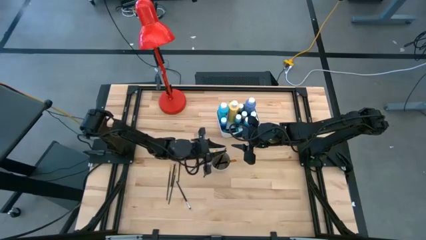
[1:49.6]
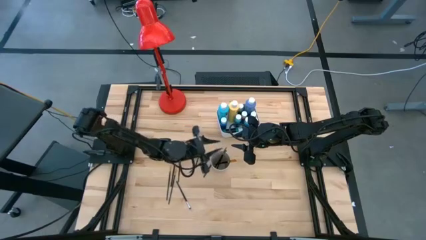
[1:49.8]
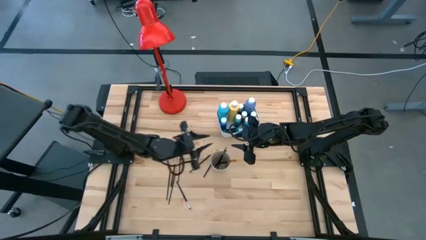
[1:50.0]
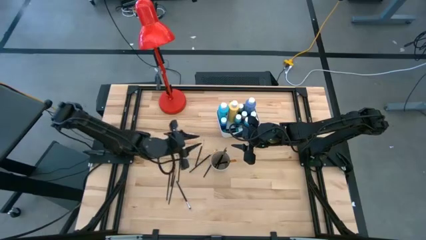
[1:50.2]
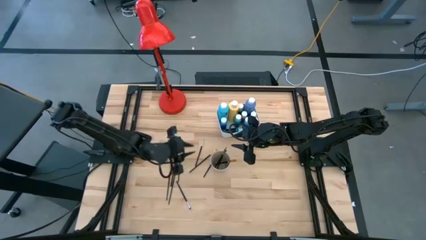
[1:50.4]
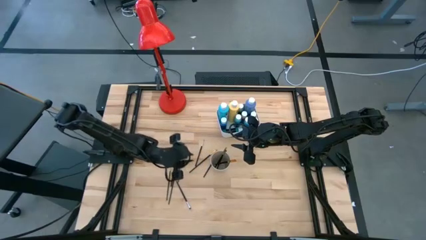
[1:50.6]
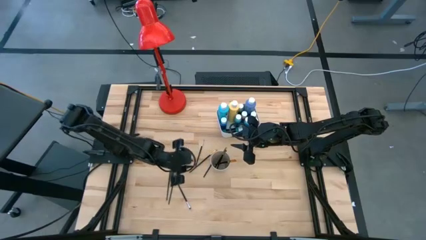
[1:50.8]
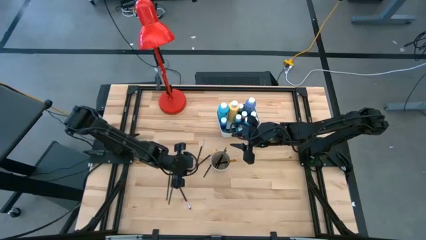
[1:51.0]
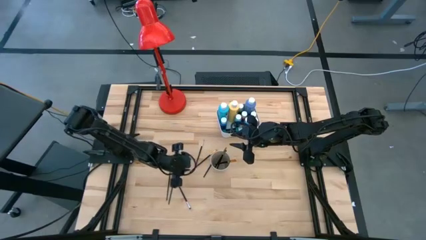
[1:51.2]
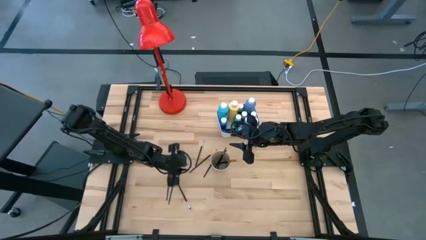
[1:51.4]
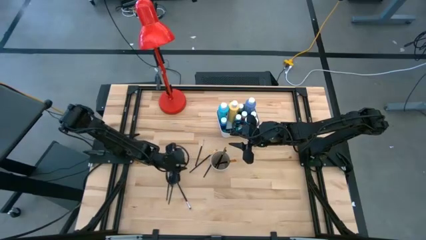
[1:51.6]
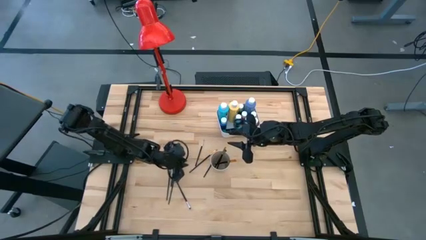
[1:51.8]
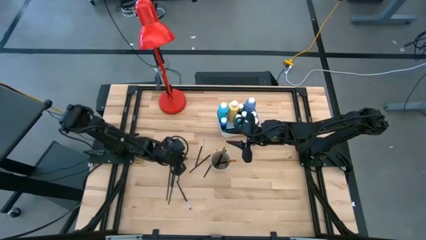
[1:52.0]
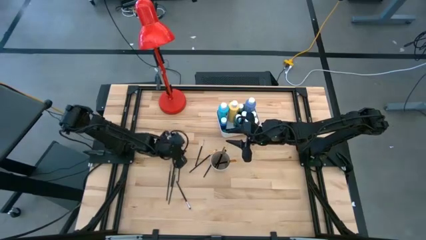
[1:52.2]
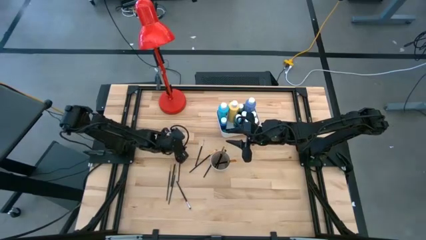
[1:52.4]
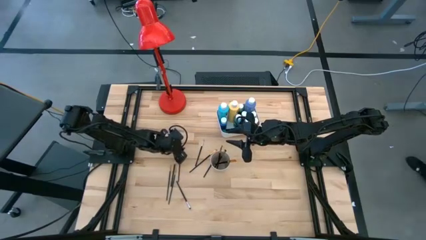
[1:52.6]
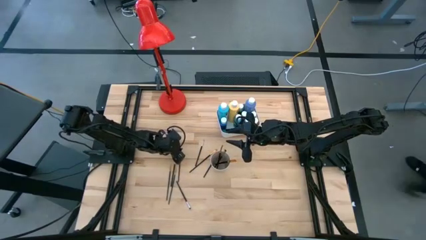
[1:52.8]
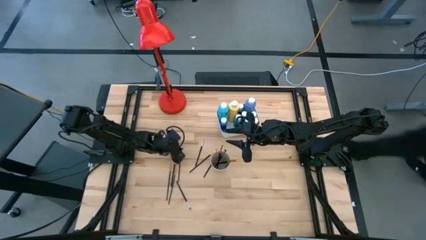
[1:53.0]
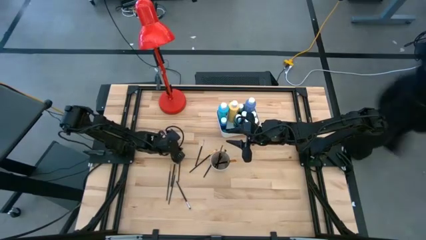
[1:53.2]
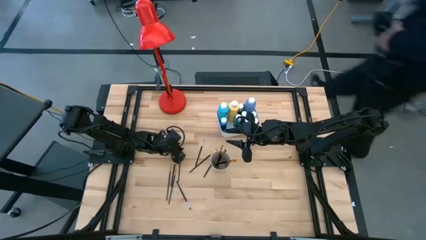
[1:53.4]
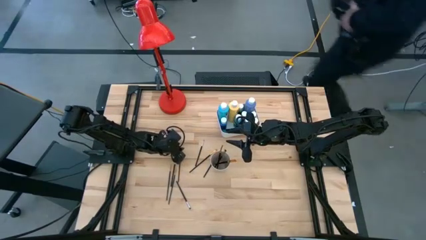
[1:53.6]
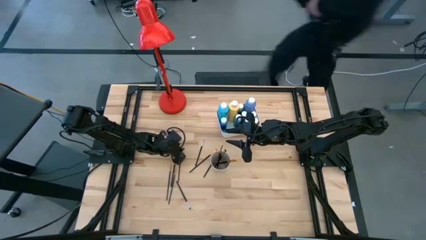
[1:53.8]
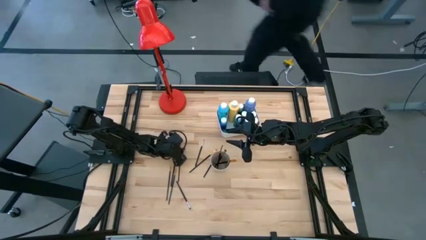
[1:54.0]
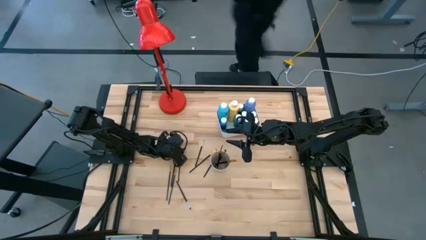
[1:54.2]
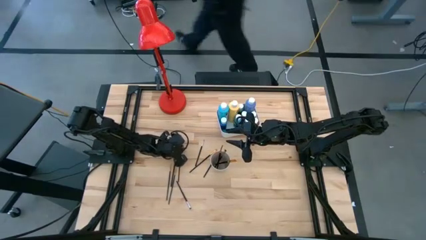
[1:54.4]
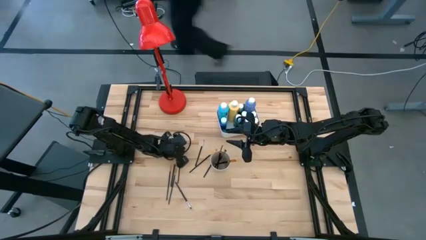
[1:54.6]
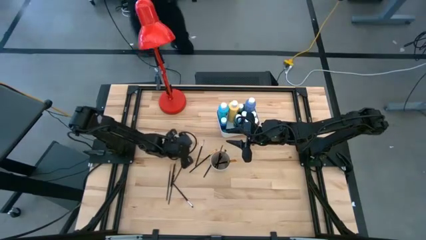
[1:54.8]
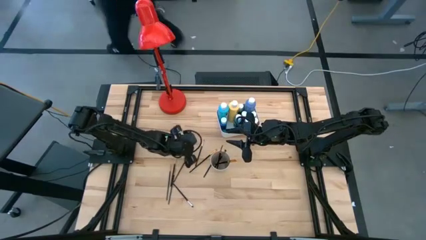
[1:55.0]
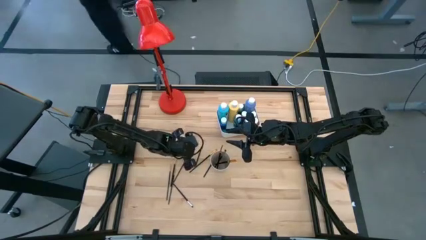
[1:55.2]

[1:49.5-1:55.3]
Task: Pick & Place Paint Supplies
Put the gold paint brush into the white cup

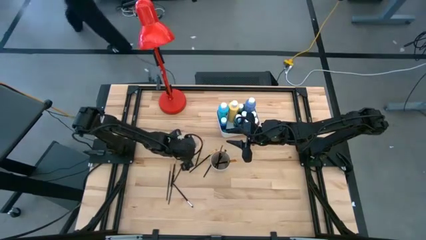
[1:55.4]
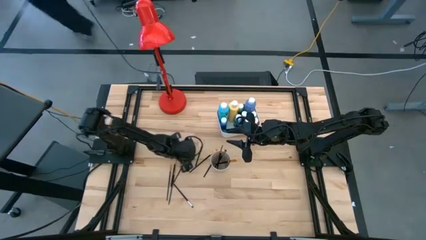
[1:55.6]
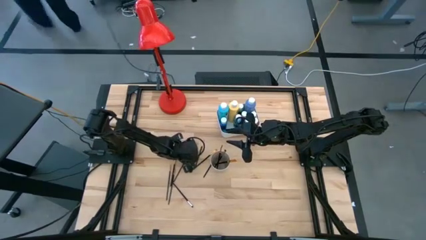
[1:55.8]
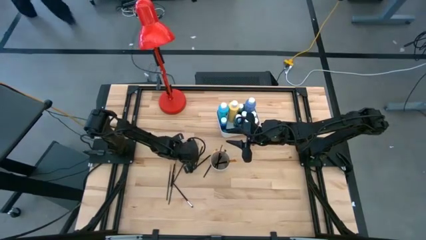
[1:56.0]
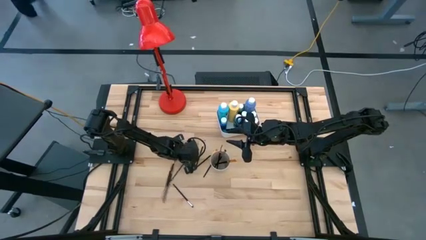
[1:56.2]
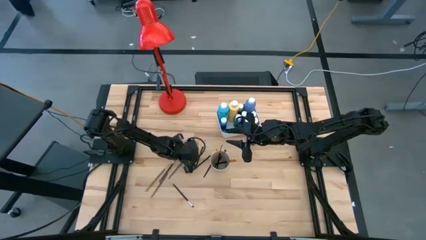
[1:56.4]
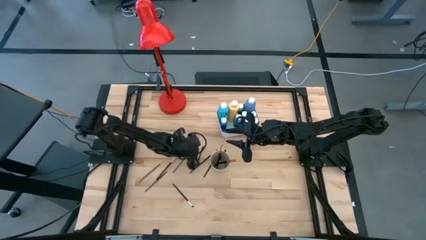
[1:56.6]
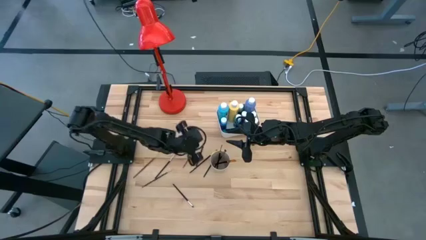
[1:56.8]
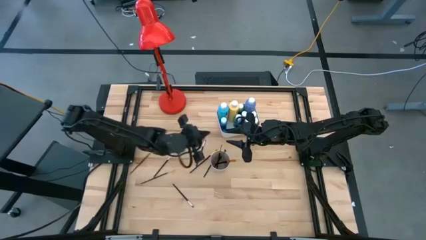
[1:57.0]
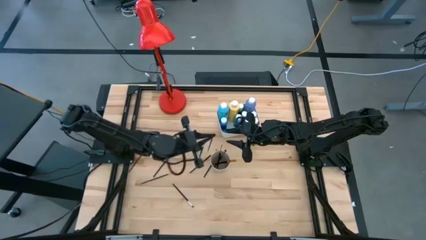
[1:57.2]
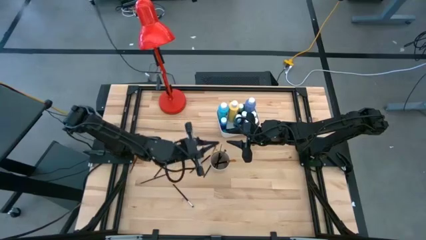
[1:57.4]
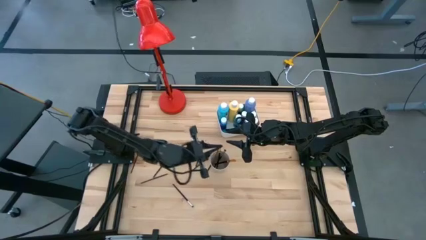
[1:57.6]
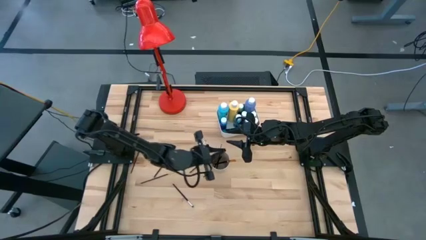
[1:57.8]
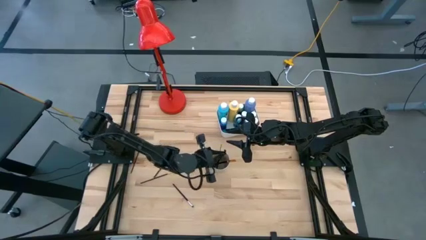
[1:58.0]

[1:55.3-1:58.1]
Put the gold paint brush into the white cup

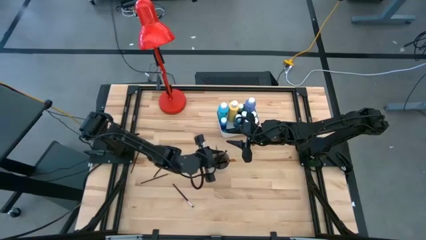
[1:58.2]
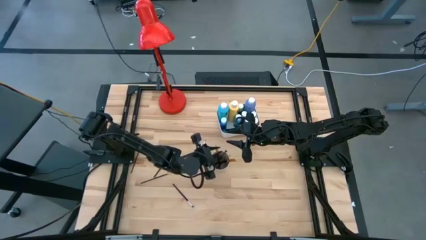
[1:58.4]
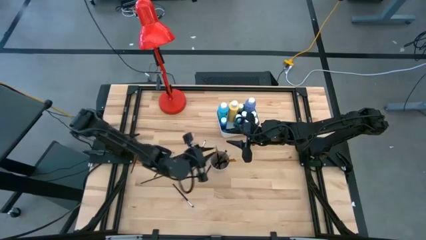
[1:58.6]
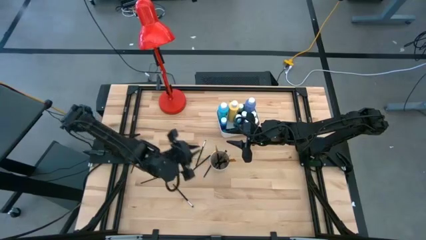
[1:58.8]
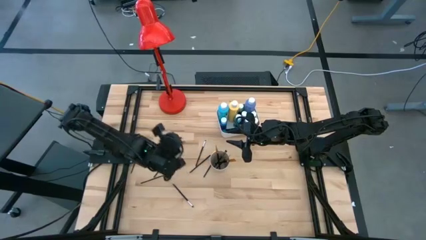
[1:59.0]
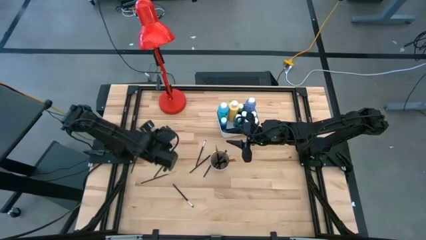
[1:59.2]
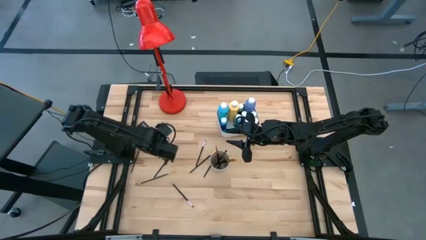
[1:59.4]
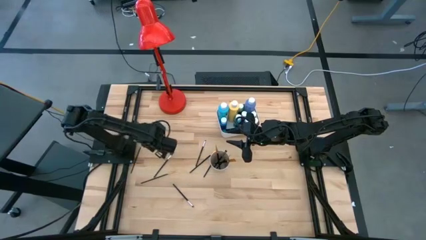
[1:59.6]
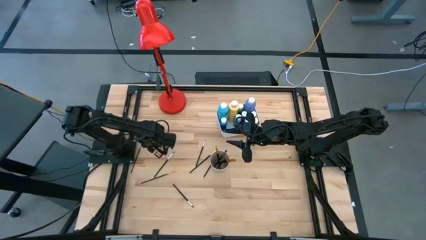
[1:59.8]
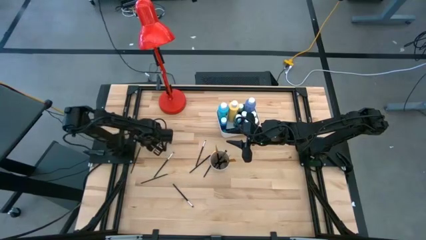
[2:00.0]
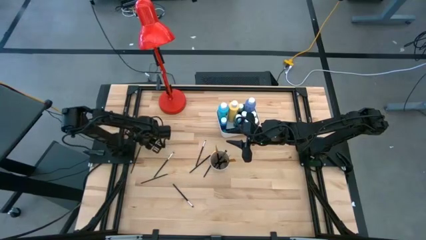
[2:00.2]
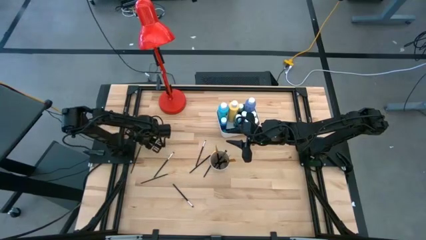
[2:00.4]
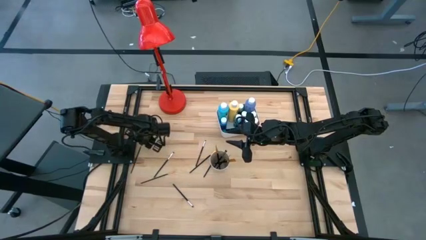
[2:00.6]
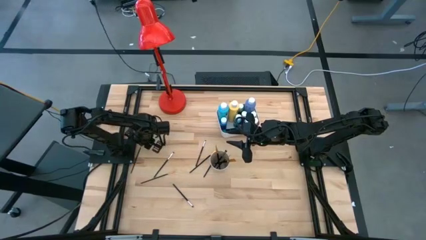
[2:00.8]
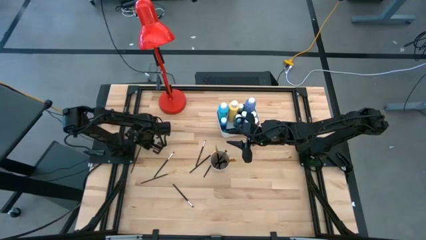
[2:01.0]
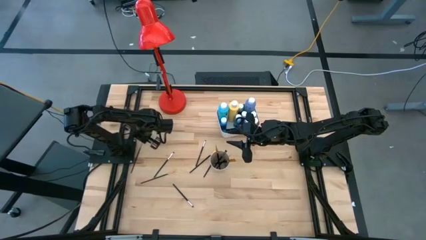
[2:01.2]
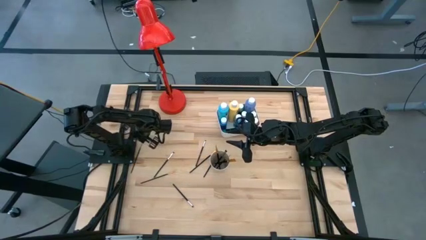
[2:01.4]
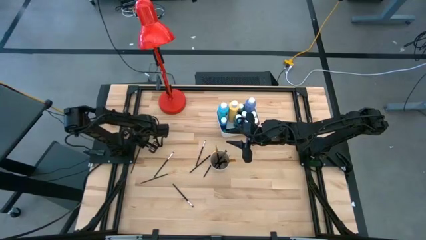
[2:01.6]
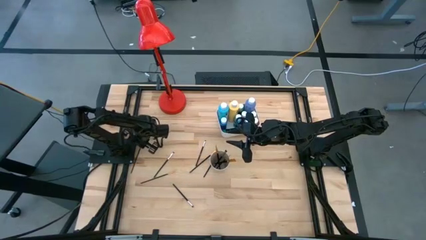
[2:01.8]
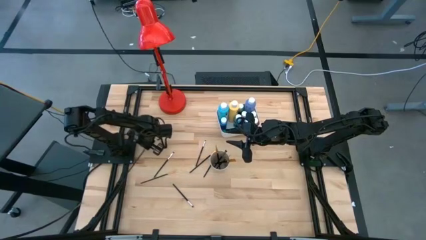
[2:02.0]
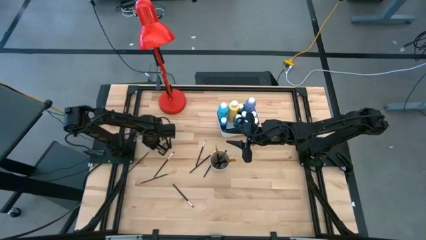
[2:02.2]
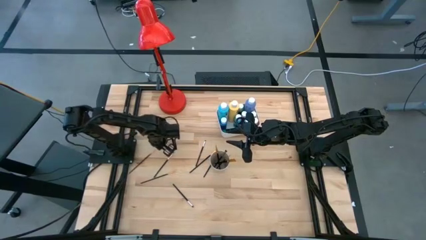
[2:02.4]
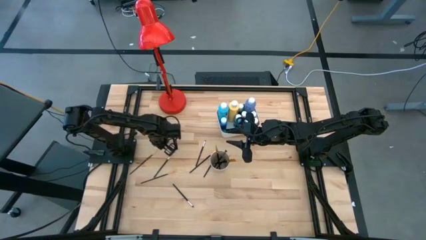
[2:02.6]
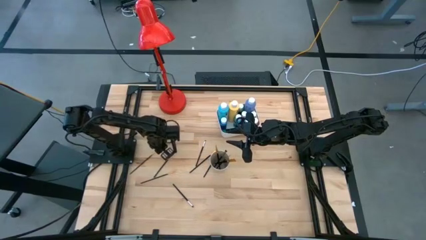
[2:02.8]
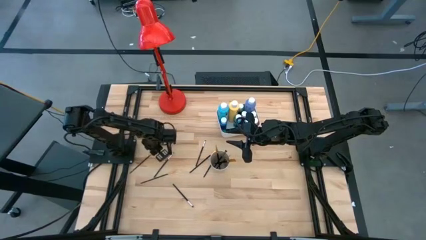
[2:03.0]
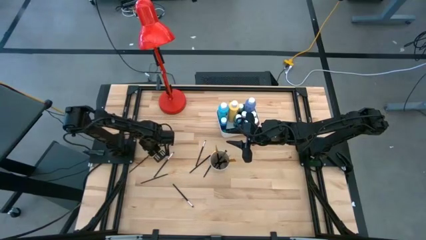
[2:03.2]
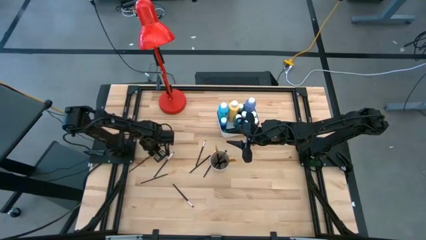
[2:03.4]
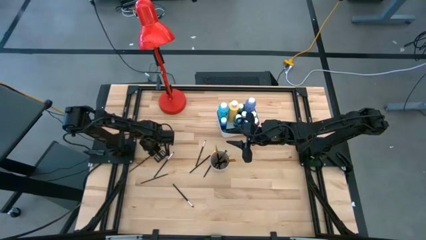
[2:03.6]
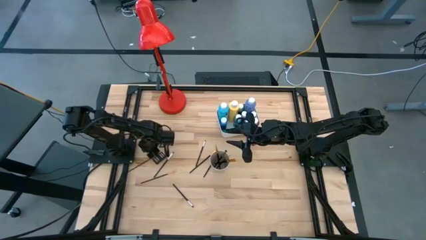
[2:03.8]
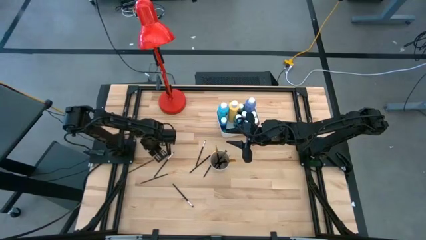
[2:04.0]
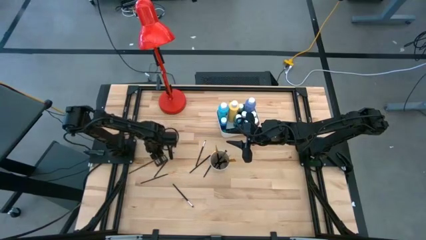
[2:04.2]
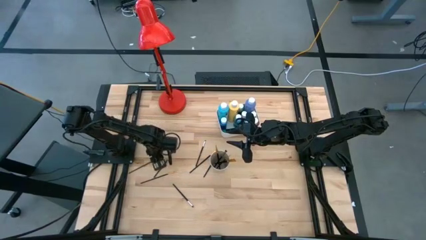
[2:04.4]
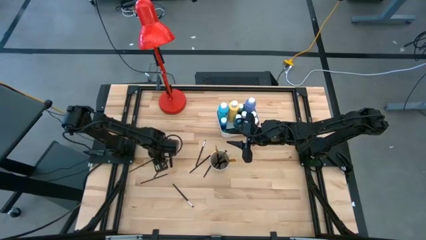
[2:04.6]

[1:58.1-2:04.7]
Put the gold paint brush into the white cup

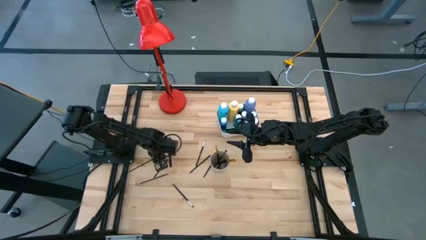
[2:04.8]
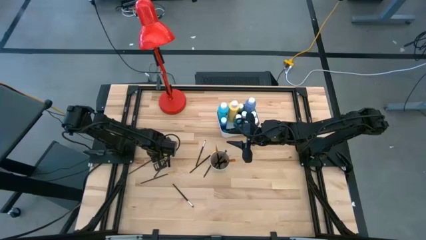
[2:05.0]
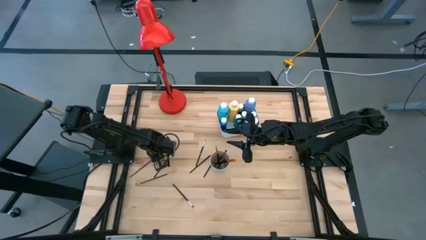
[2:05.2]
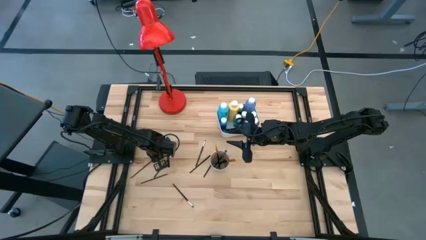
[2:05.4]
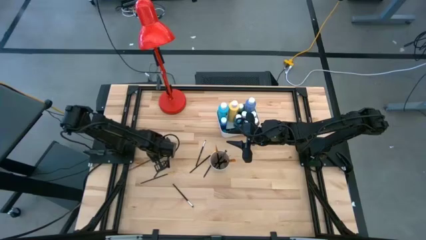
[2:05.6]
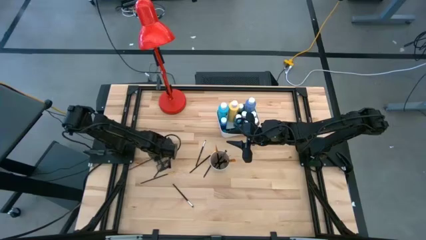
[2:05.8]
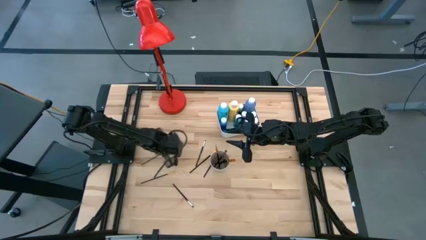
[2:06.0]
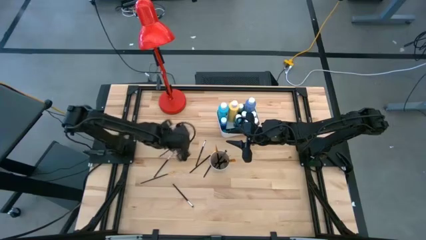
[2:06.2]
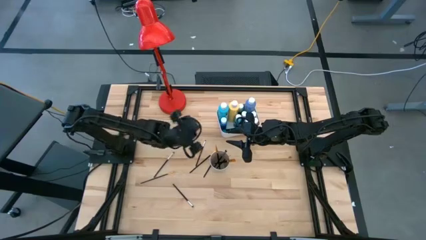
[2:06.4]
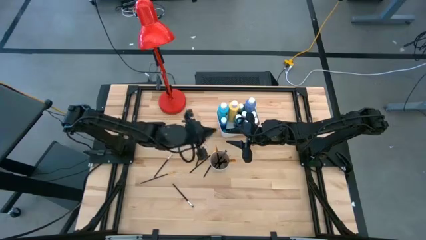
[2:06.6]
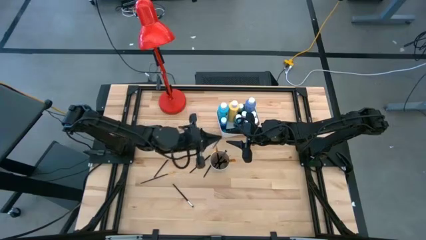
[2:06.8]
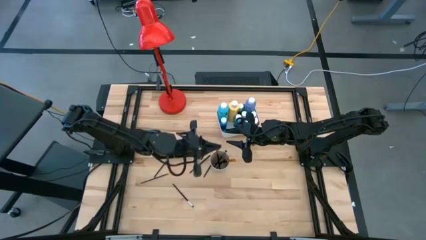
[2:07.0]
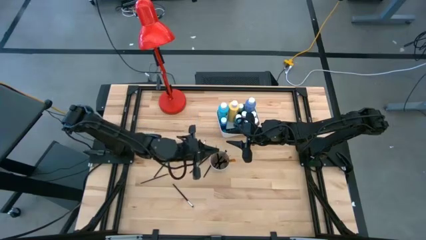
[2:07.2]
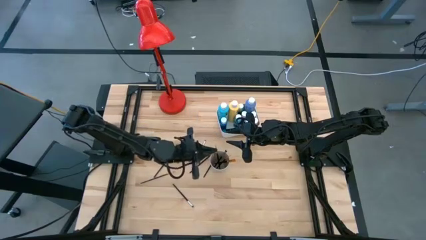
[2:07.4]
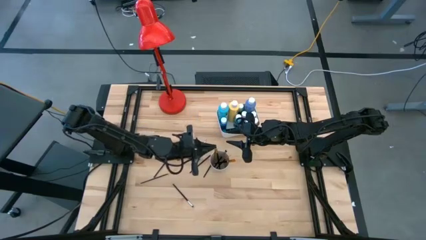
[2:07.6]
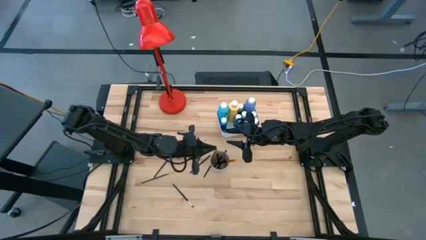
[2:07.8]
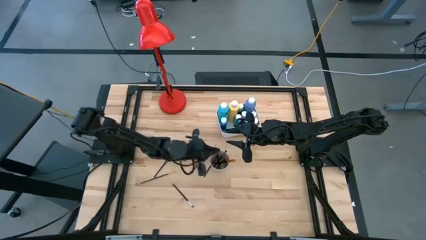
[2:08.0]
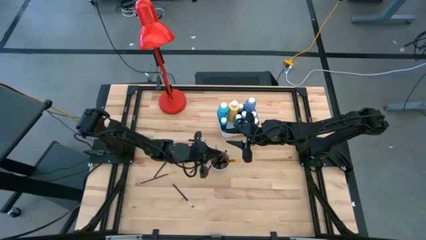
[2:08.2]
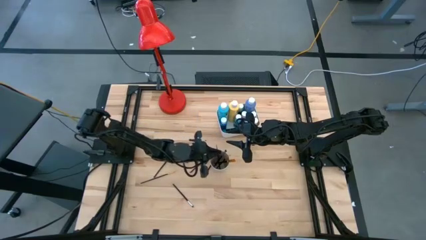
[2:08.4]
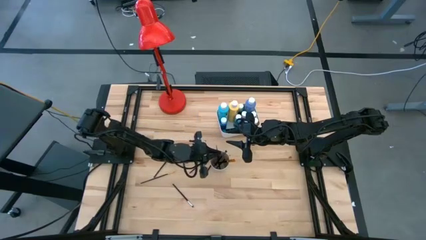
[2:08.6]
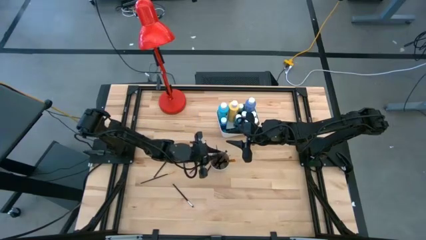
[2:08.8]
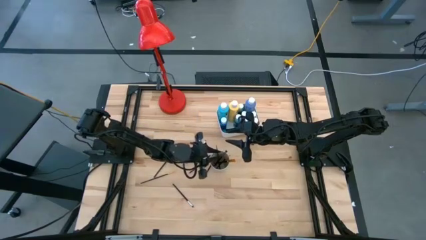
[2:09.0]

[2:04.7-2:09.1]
Put the gold paint brush into the white cup
